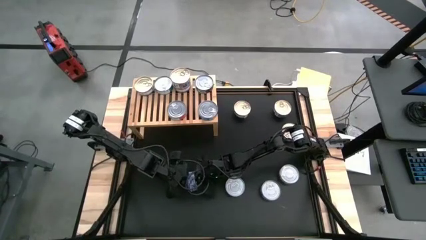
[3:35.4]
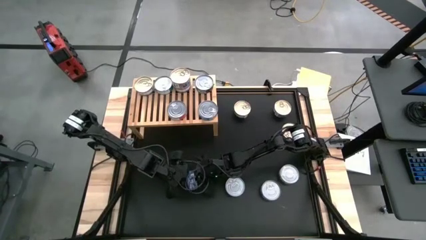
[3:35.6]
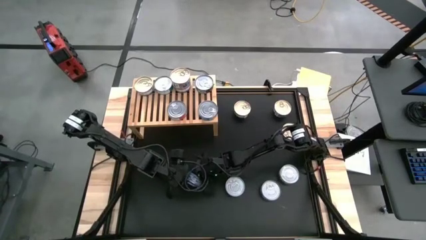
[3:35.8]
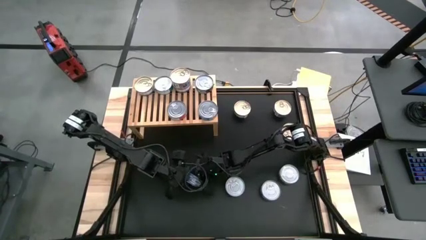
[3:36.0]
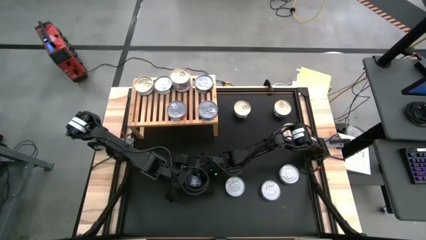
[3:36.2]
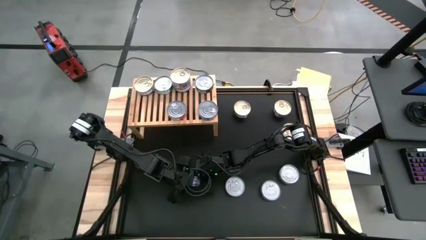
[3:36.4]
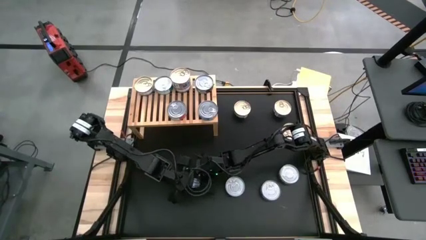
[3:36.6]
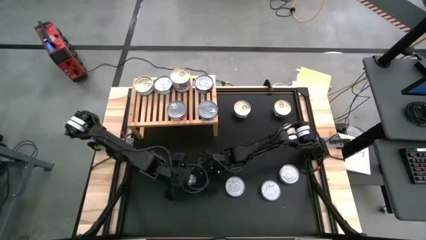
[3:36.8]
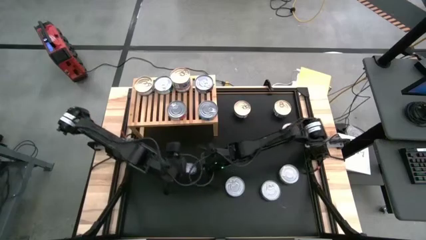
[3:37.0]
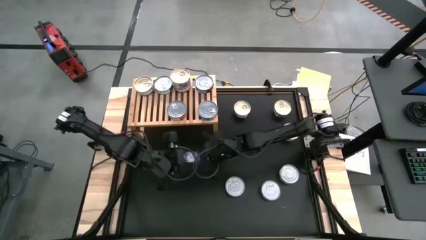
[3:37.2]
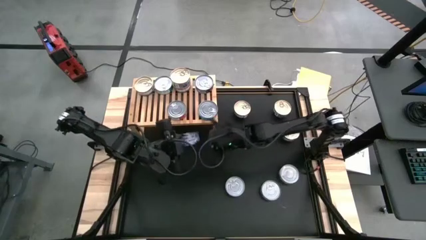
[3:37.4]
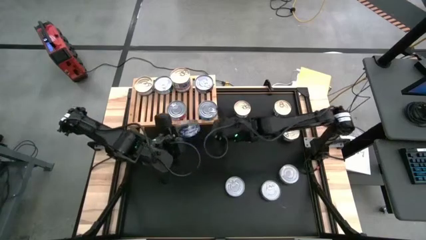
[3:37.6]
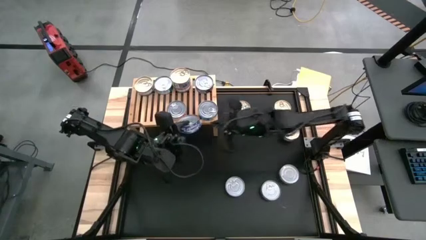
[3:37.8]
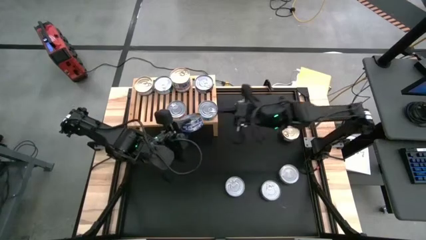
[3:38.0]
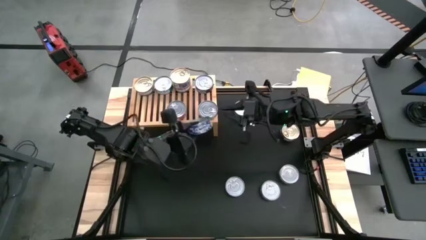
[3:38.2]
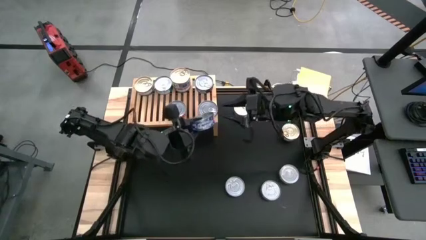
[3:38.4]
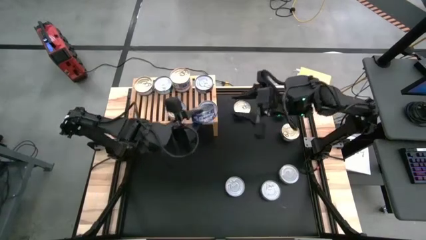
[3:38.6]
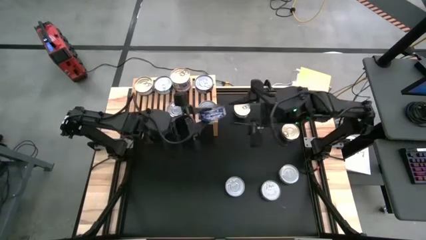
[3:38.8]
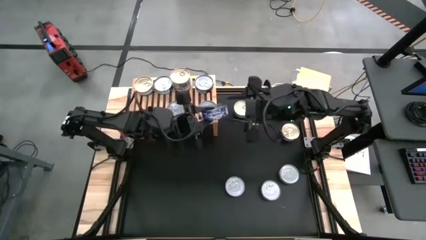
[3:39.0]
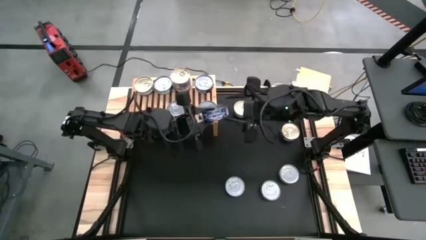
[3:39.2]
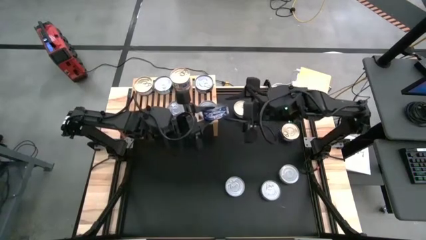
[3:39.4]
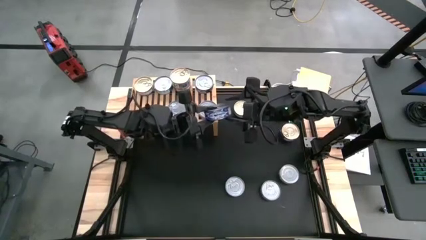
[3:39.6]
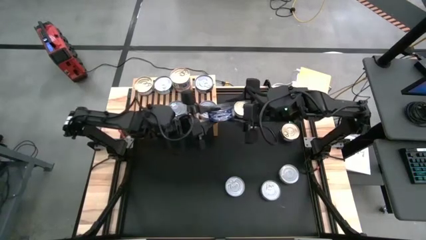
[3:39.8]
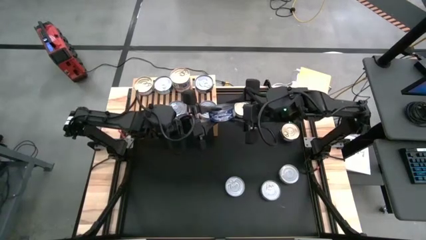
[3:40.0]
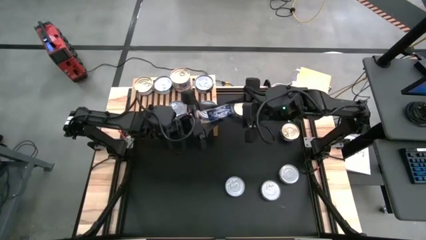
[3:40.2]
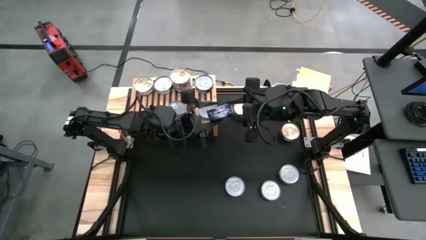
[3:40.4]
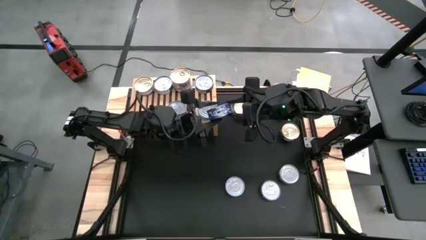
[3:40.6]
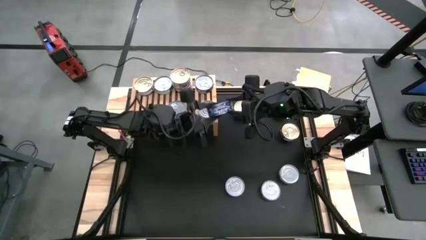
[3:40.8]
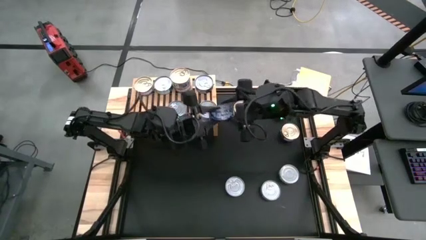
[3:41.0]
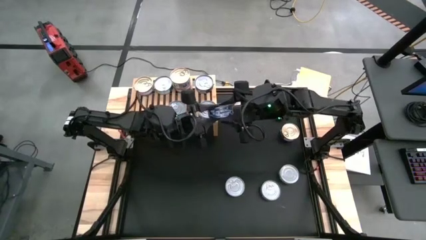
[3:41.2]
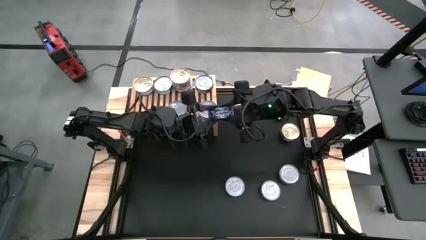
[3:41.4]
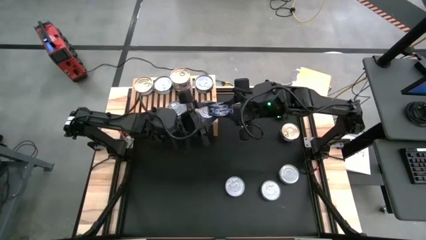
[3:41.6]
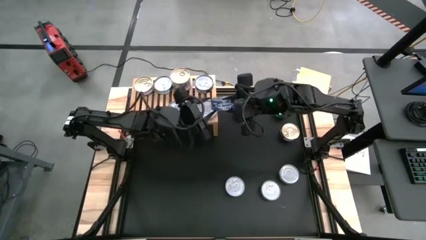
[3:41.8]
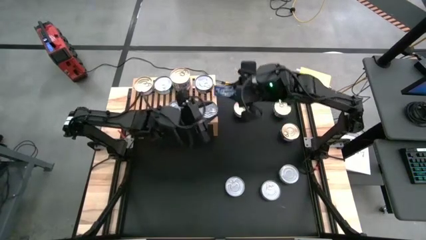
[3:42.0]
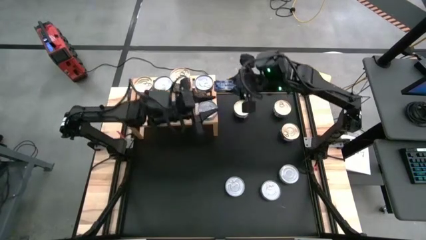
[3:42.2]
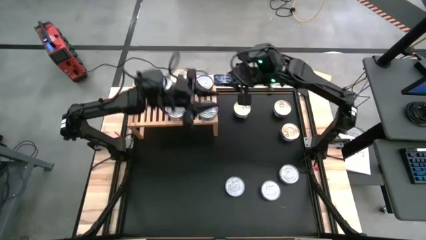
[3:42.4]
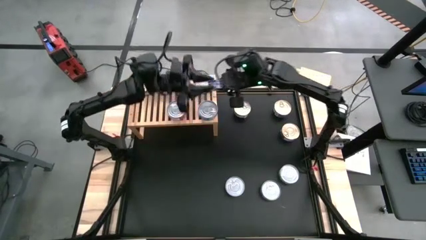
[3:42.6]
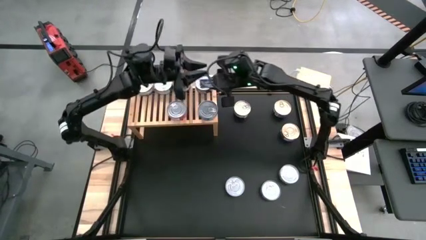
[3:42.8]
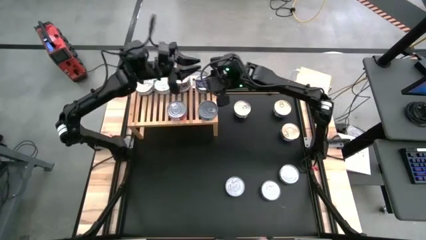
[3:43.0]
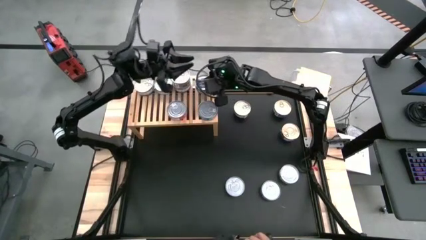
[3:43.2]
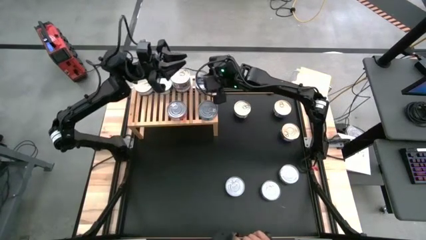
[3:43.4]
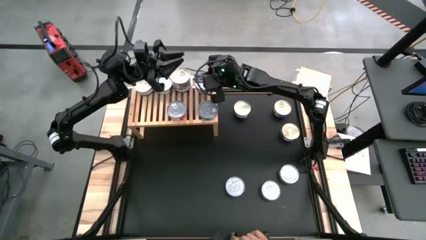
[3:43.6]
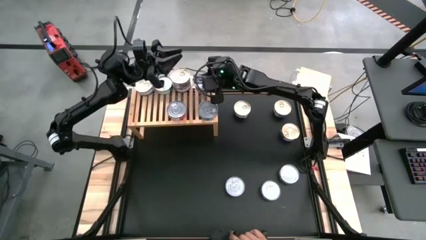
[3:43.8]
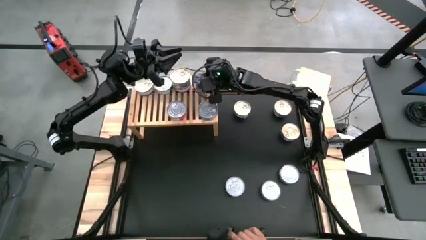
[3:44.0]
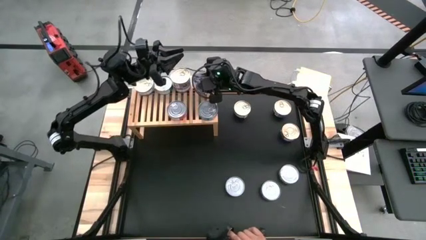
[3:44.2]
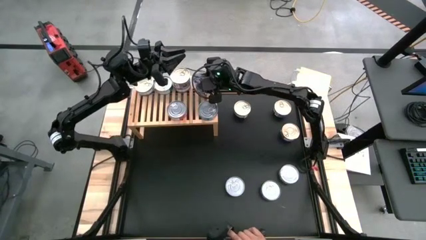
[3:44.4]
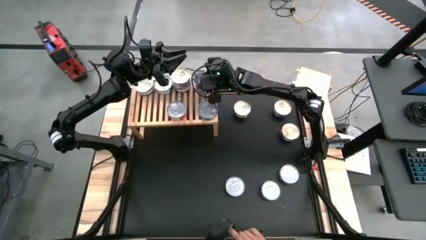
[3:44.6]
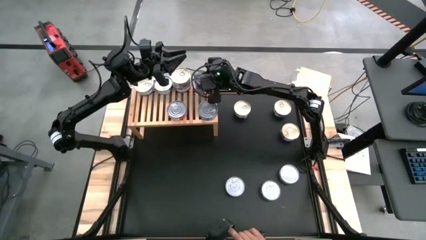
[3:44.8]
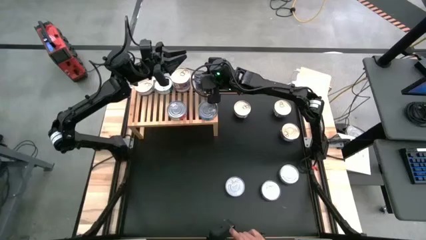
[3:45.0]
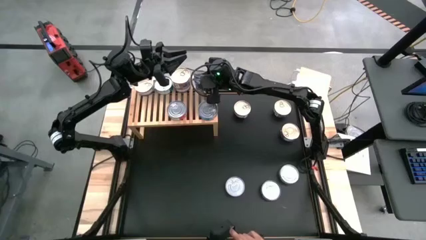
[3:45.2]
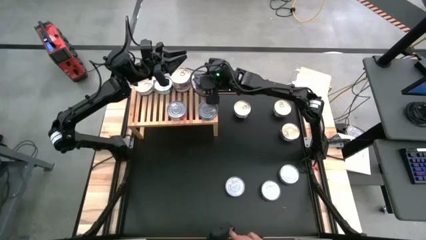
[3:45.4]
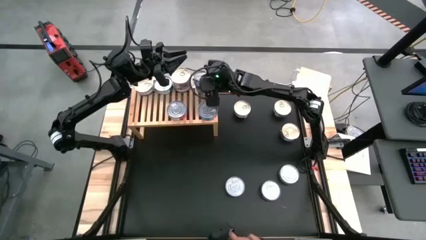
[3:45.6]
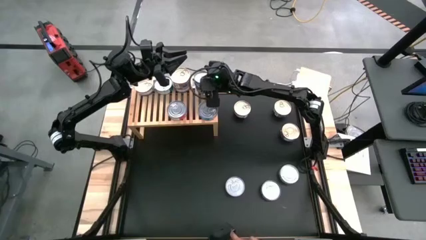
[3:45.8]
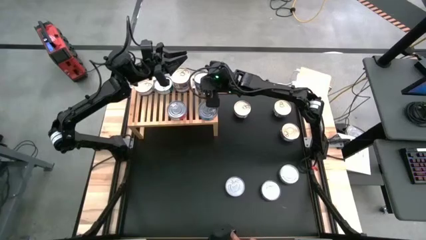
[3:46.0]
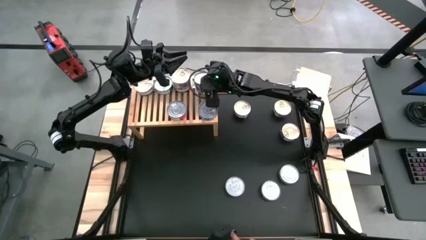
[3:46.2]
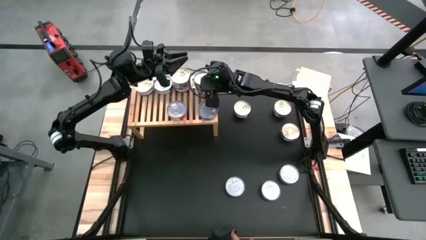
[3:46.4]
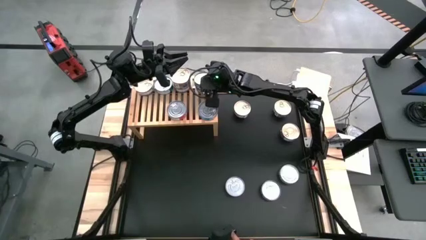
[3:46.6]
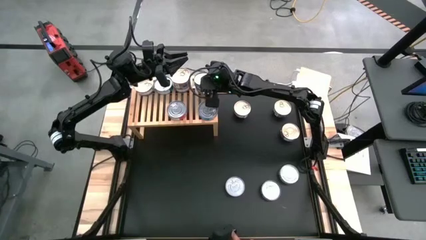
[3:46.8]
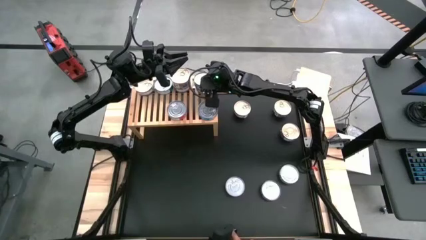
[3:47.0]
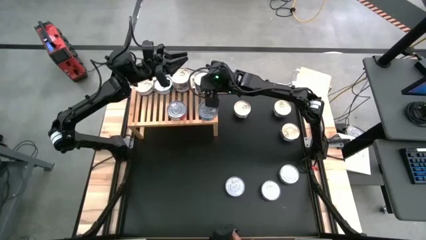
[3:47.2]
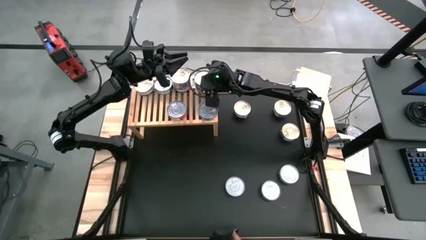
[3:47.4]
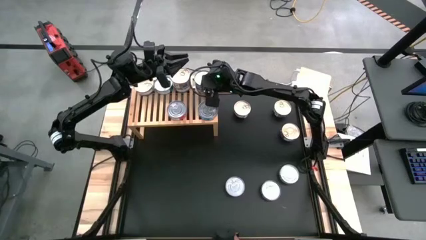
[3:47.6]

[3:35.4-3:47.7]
Task: Stack canned seafood by type on shelf
Stack the blue tuna can on top of the other blue tuna can on the shelf
